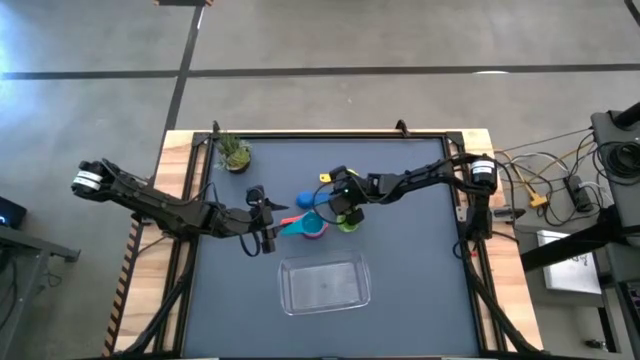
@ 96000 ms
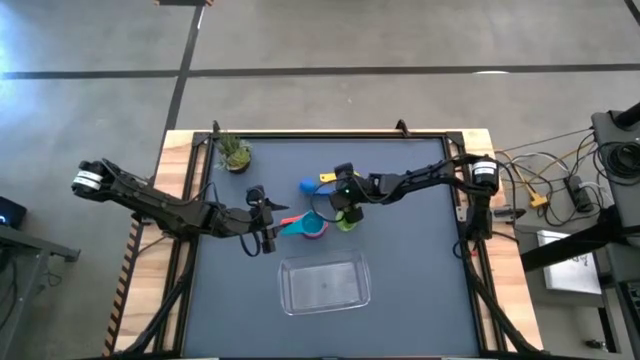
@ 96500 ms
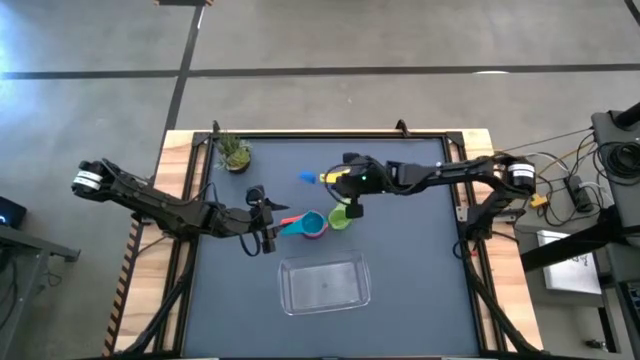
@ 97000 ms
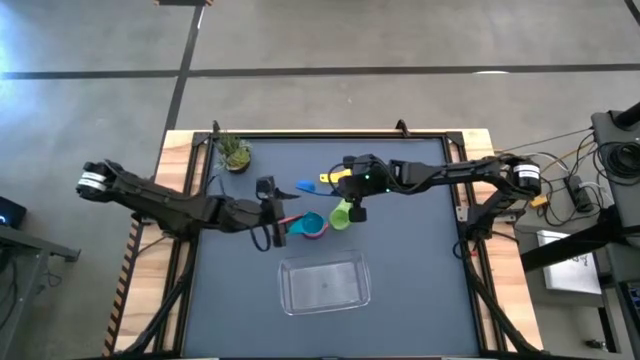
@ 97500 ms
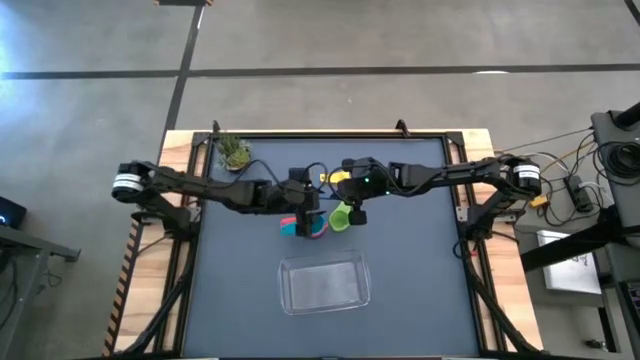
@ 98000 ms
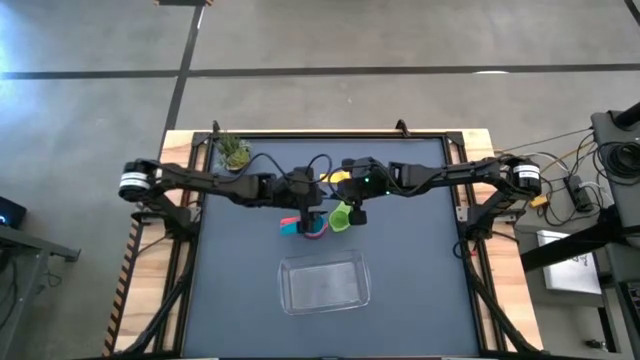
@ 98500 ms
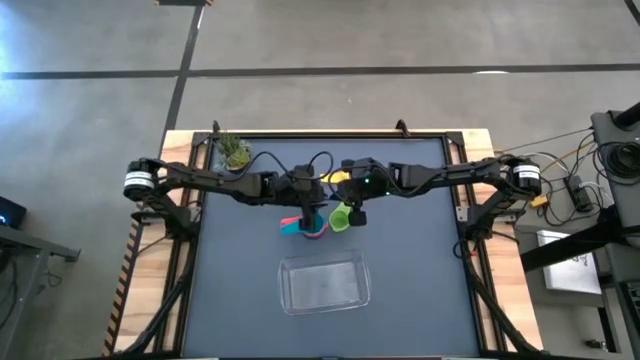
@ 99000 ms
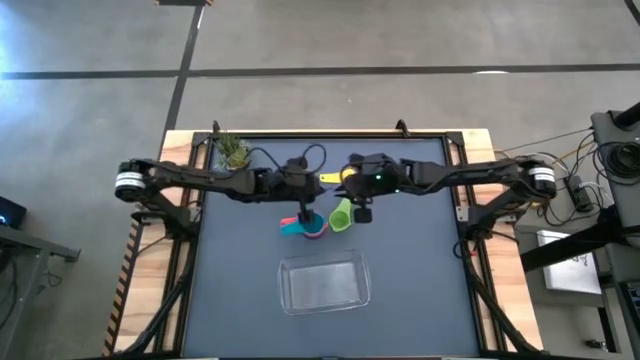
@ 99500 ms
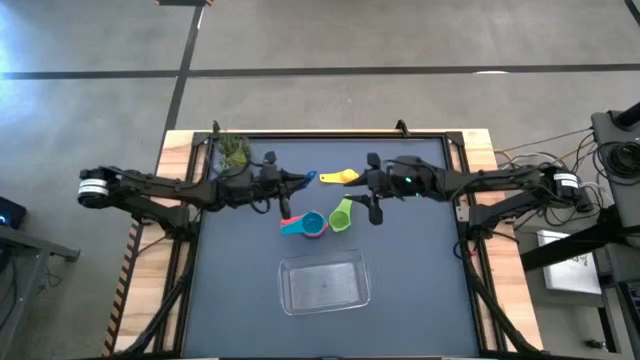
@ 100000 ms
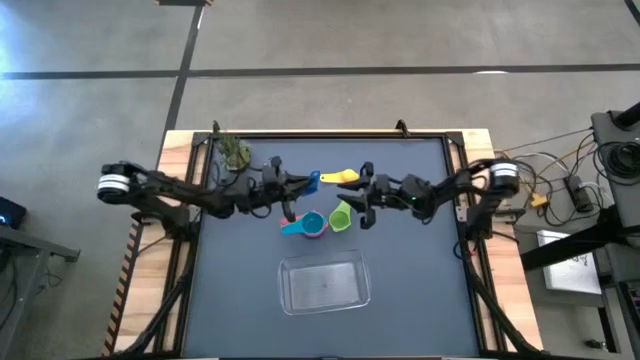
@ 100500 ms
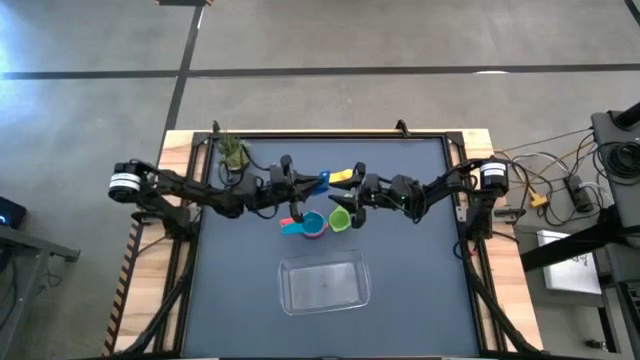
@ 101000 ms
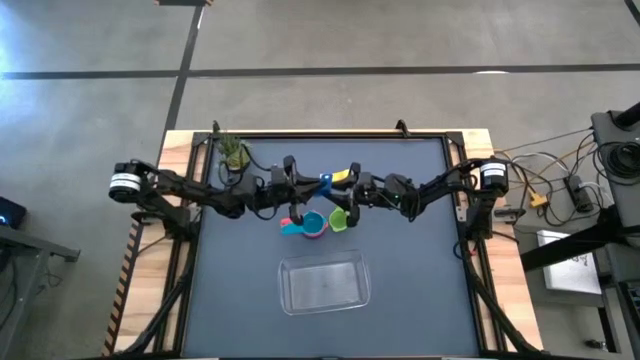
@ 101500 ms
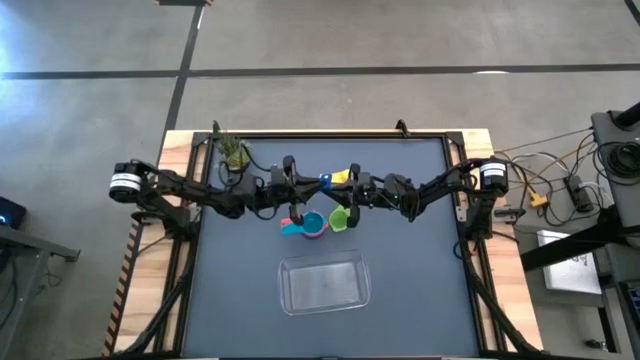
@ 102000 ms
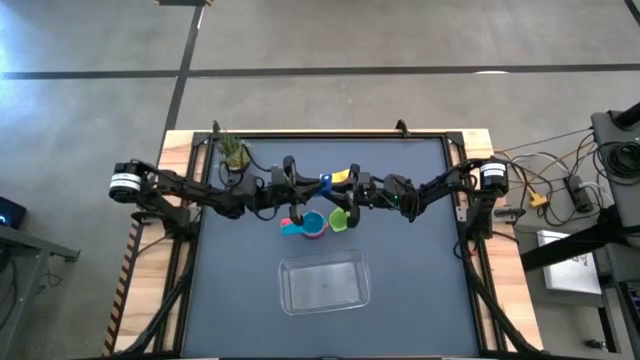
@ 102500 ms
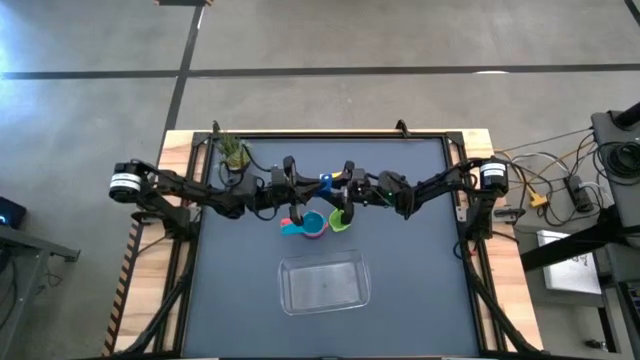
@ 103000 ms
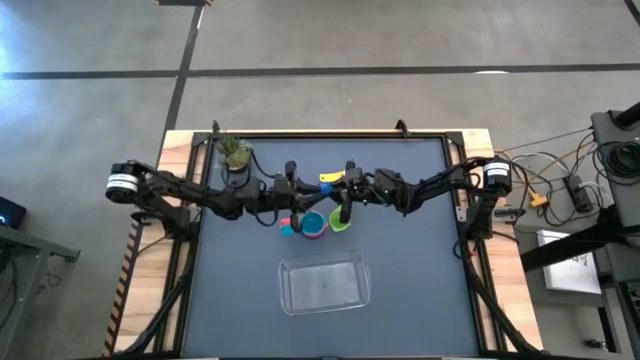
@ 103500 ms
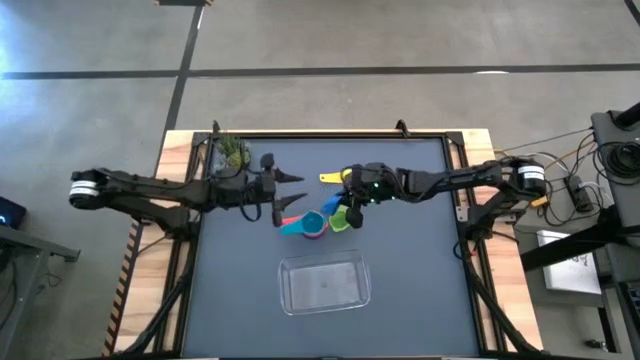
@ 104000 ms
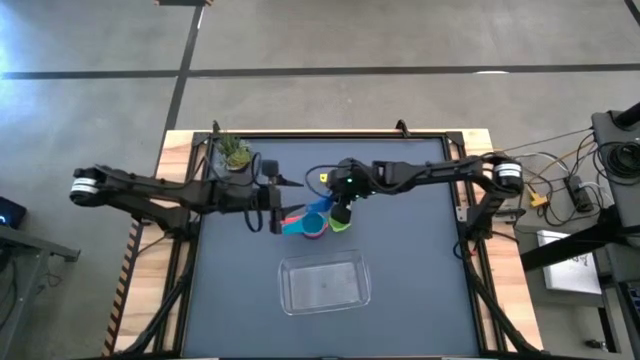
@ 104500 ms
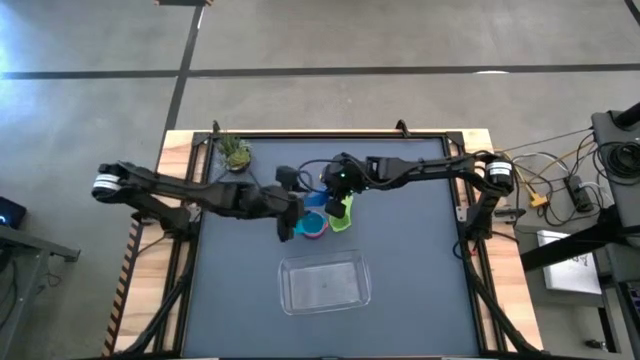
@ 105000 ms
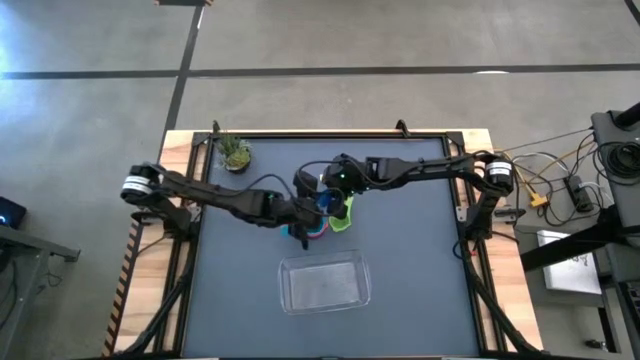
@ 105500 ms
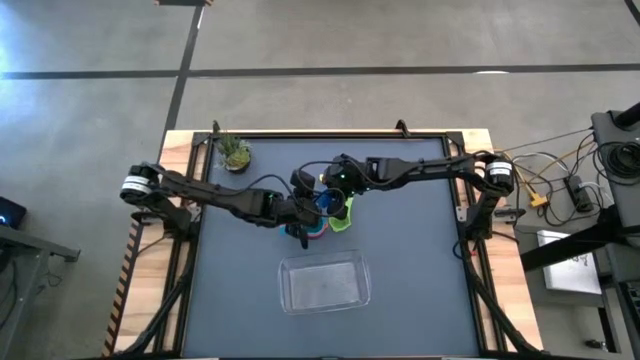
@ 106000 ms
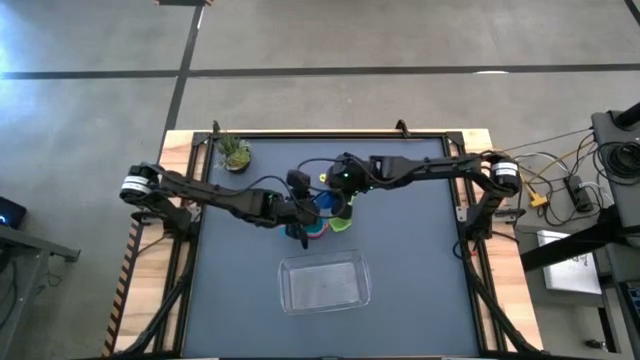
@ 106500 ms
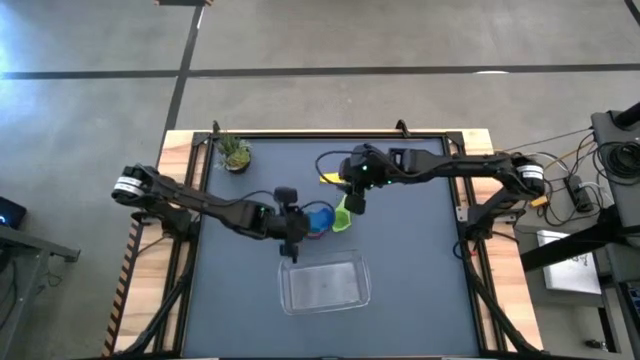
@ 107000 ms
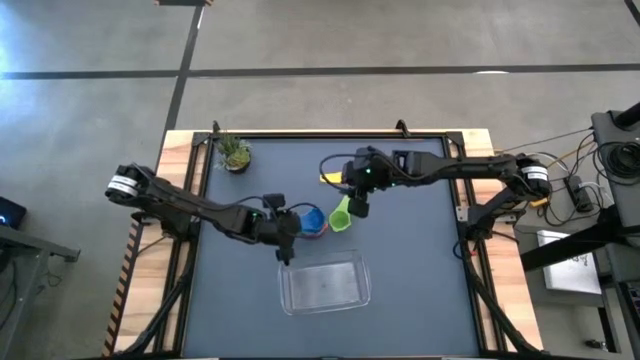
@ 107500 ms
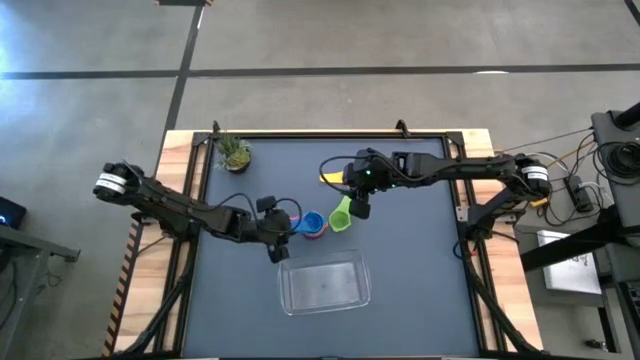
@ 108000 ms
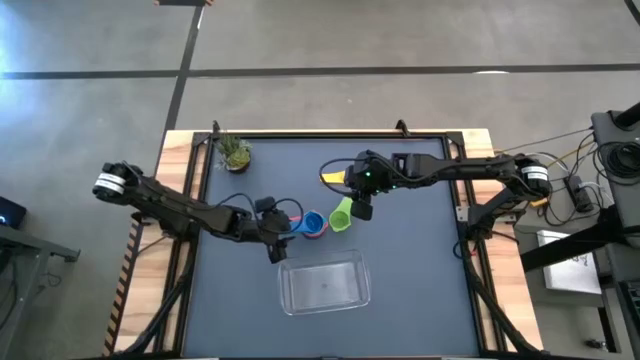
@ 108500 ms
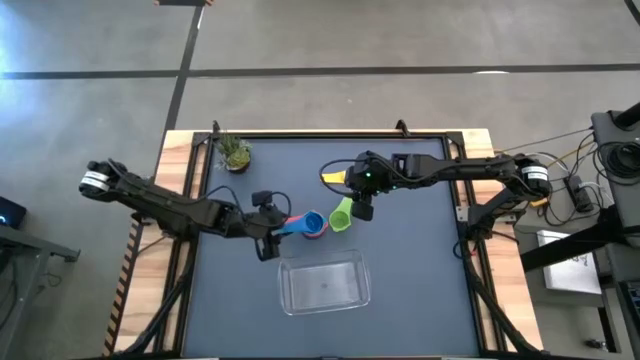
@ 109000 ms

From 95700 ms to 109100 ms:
Task: Nest measuring cups in basket
Stack the blue measuring cup on top of the light blue measuring cup

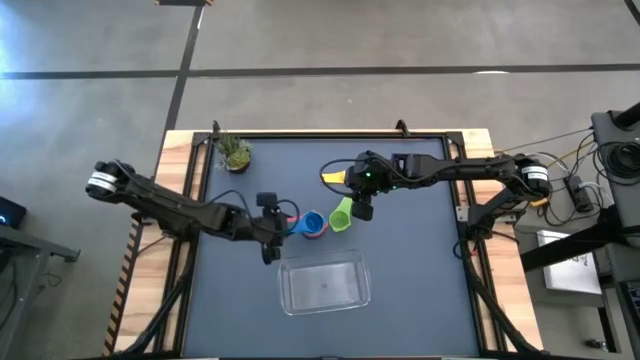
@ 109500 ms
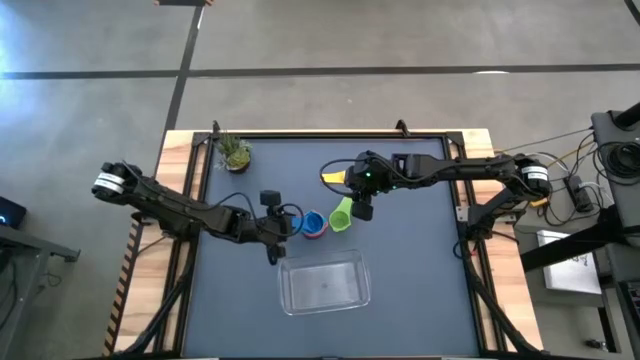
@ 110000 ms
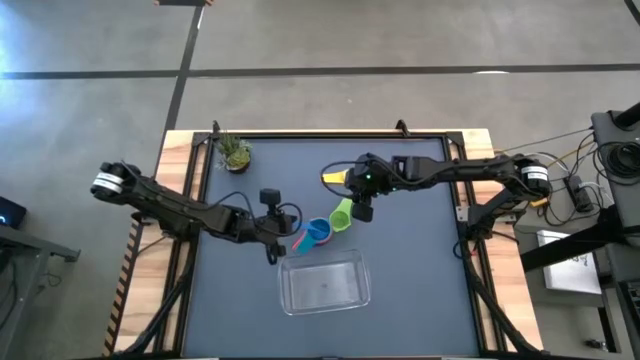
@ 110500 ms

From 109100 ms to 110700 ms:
Remove the blue measuring cup from the light blue measuring cup

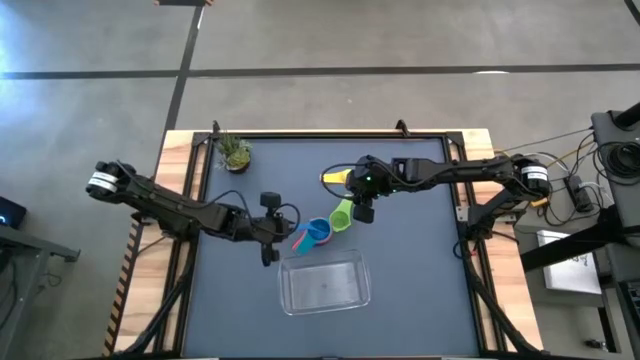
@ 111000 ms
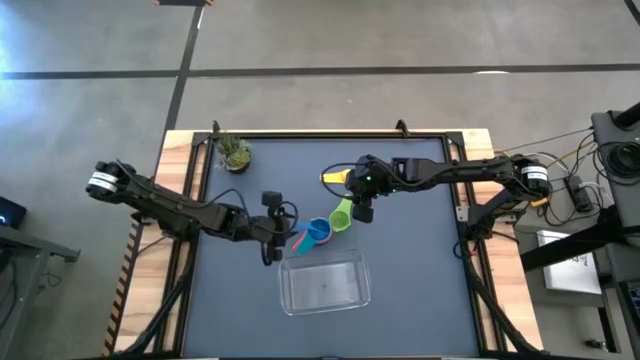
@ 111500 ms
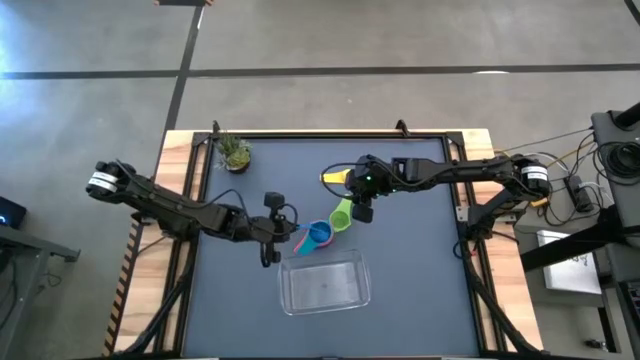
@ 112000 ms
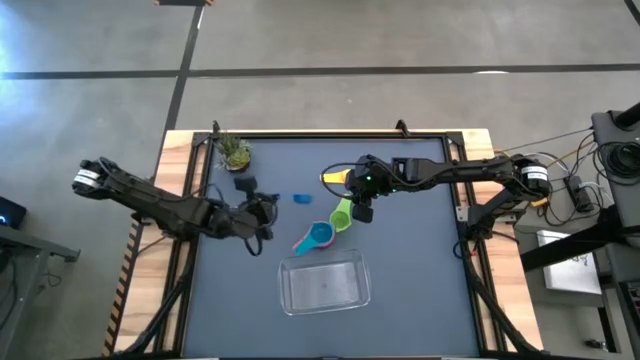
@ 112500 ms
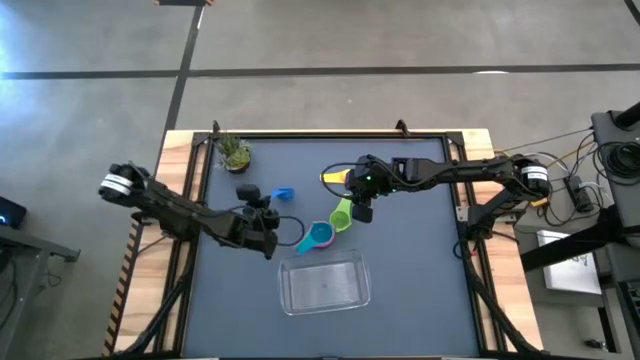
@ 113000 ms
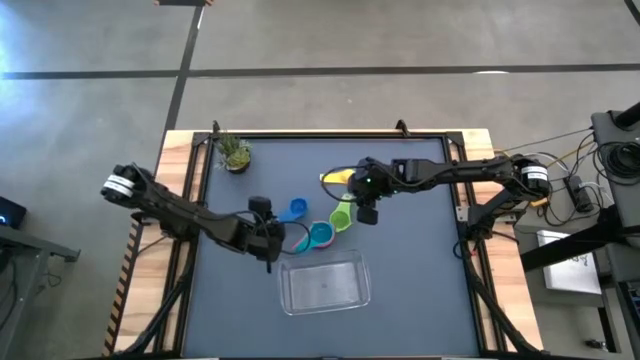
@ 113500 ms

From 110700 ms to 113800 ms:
Remove the blue measuring cup from the light blue measuring cup

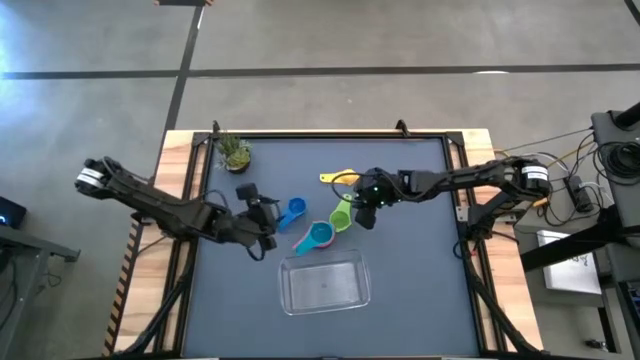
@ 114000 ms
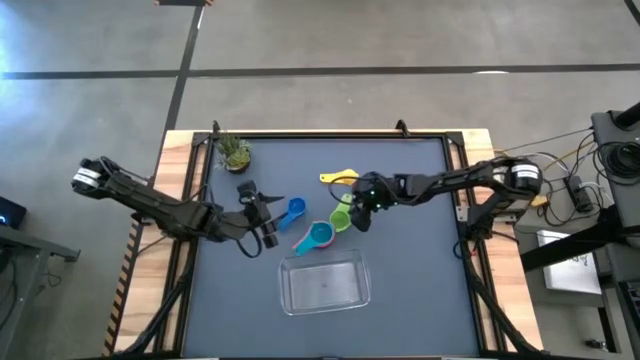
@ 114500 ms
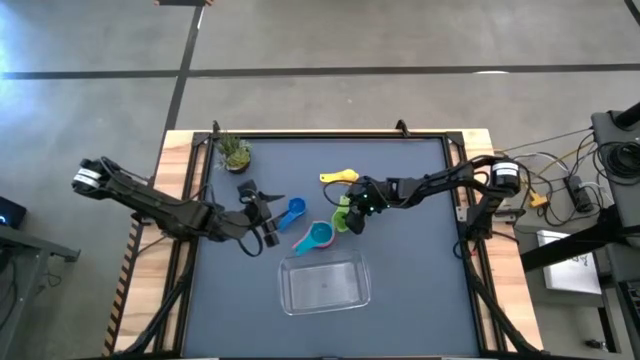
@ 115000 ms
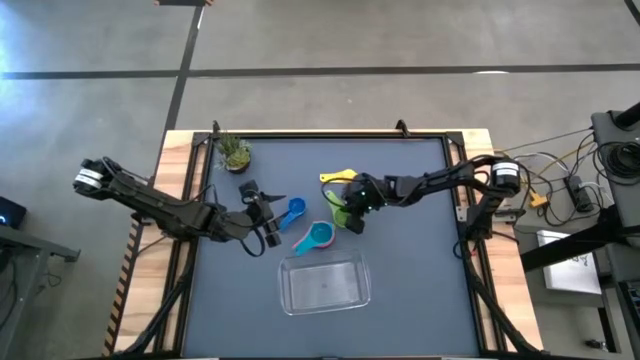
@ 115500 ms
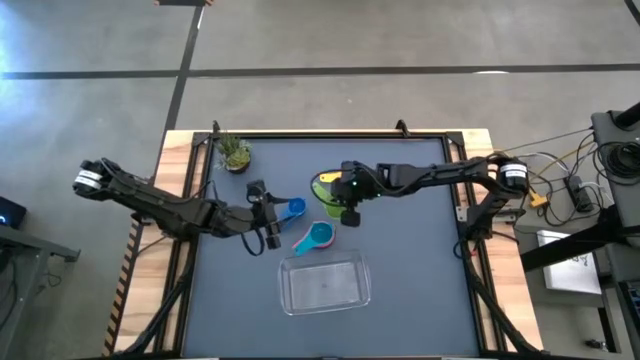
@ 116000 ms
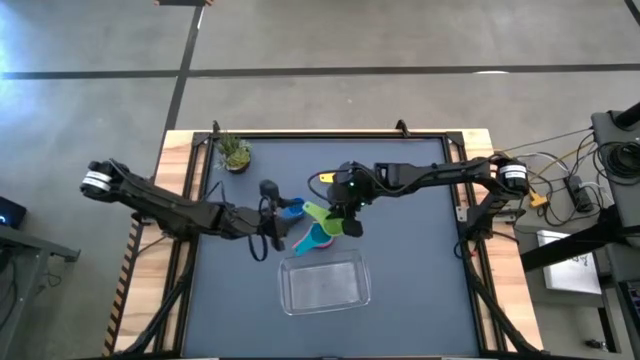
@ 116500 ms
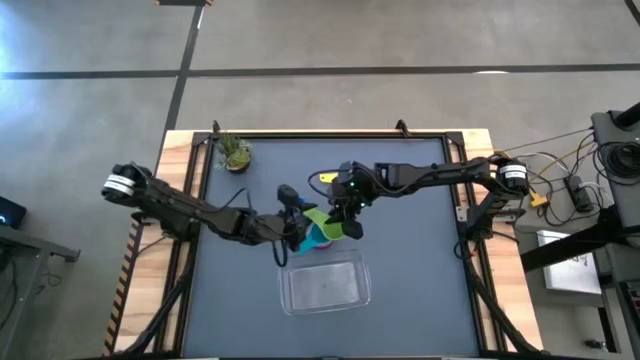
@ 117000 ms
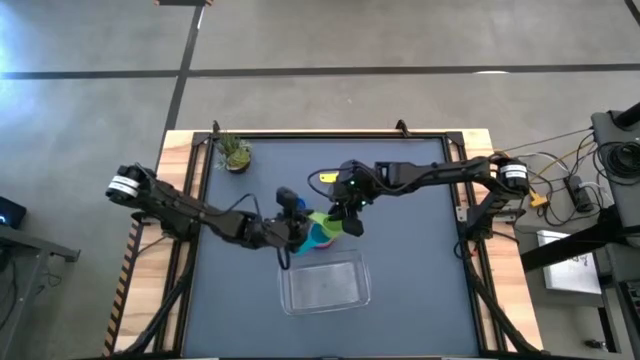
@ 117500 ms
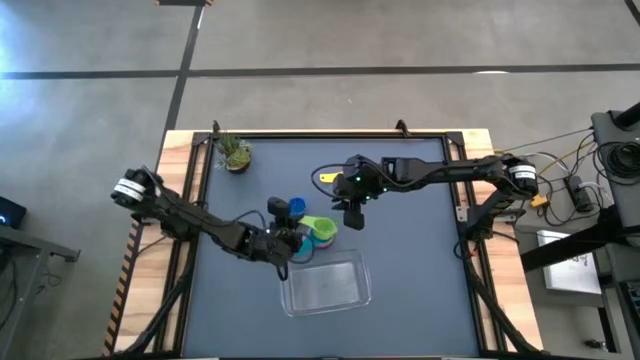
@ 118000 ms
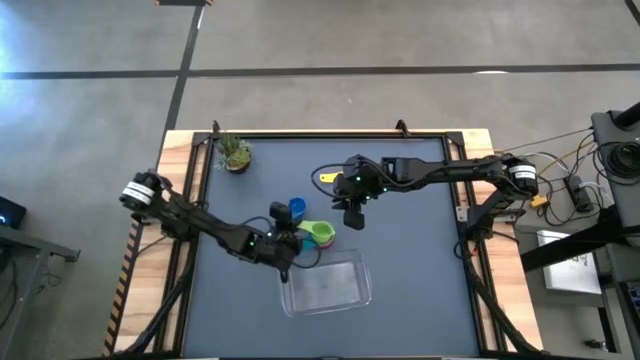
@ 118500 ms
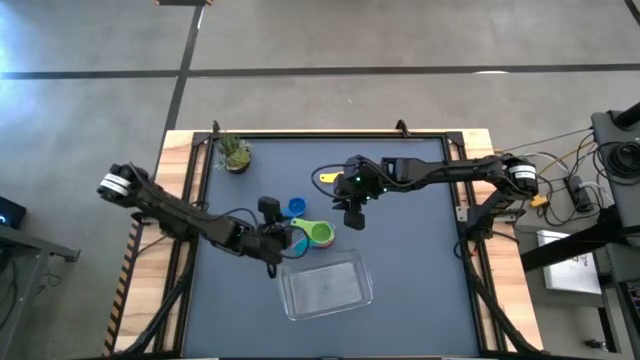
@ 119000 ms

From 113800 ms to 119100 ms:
Stack the green measuring cup on top of the light blue measuring cup
